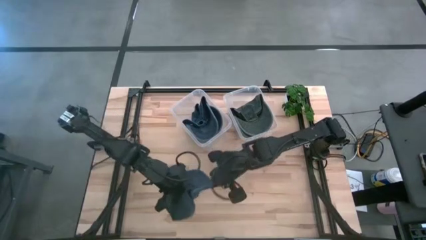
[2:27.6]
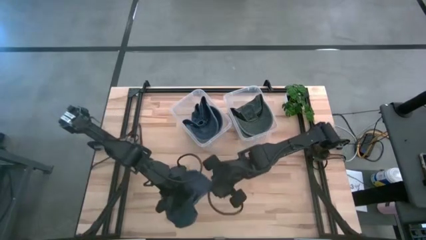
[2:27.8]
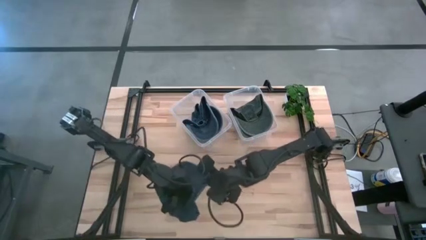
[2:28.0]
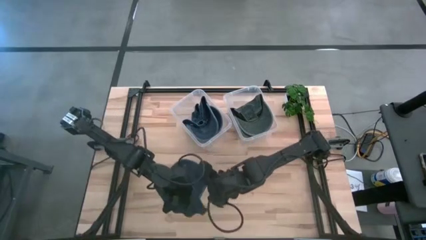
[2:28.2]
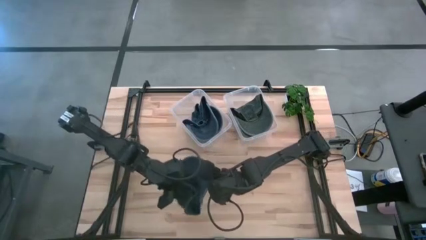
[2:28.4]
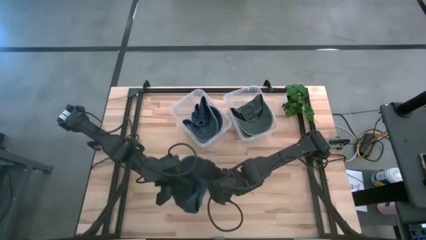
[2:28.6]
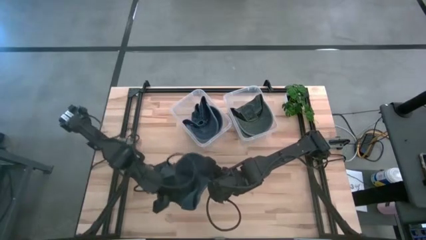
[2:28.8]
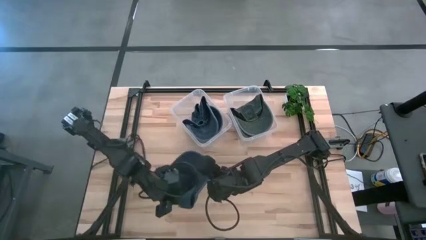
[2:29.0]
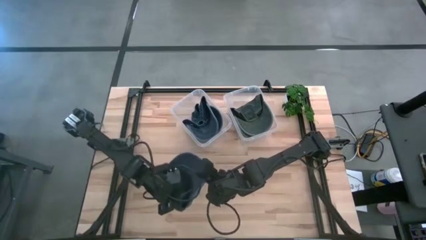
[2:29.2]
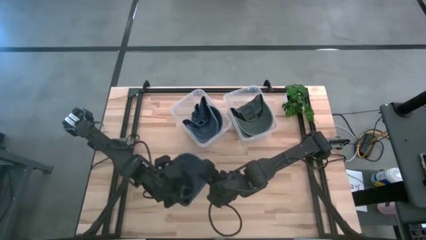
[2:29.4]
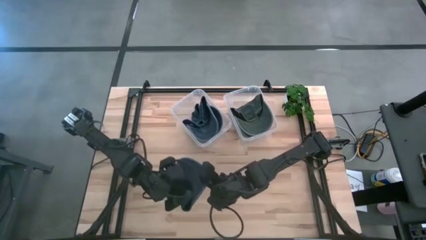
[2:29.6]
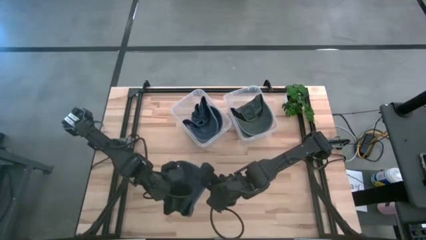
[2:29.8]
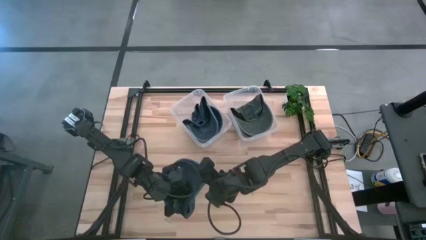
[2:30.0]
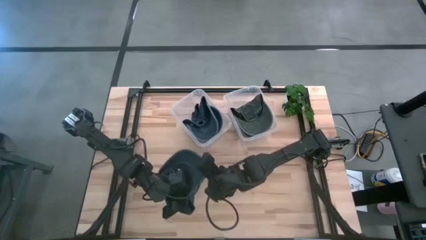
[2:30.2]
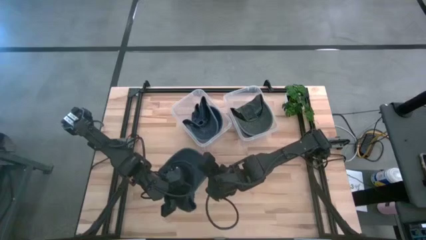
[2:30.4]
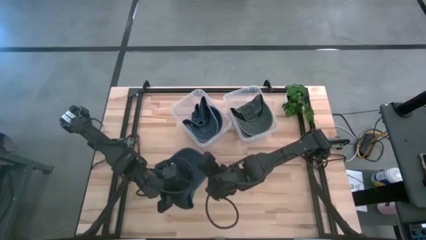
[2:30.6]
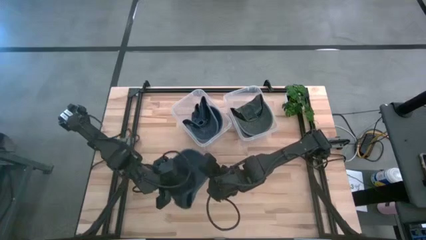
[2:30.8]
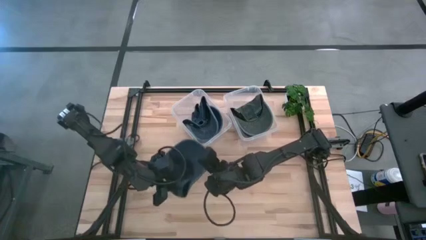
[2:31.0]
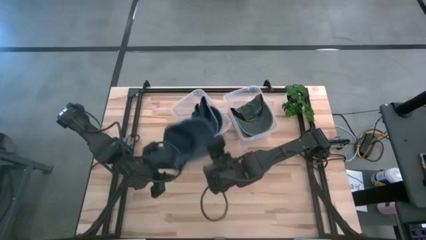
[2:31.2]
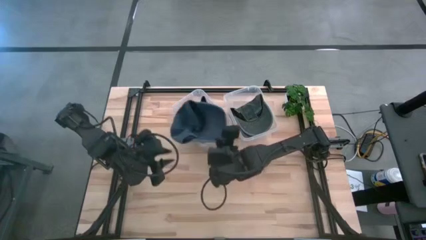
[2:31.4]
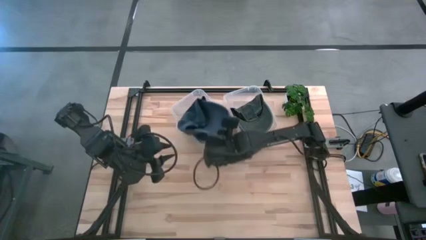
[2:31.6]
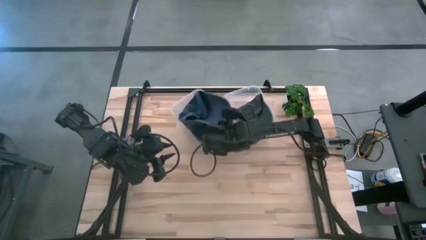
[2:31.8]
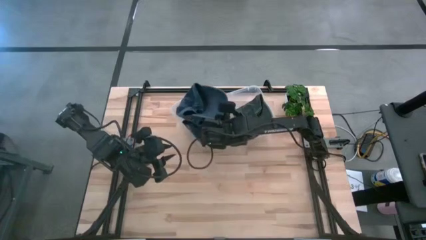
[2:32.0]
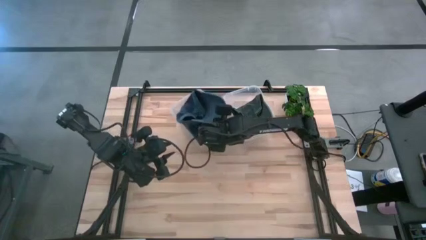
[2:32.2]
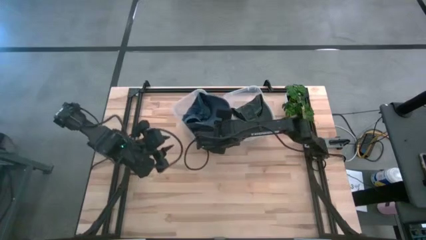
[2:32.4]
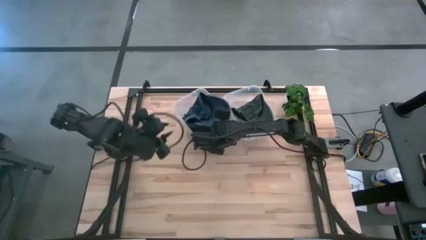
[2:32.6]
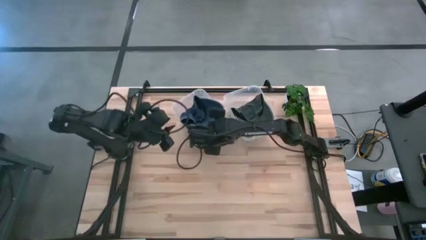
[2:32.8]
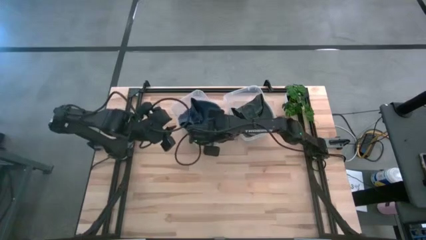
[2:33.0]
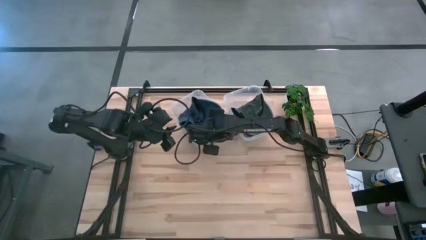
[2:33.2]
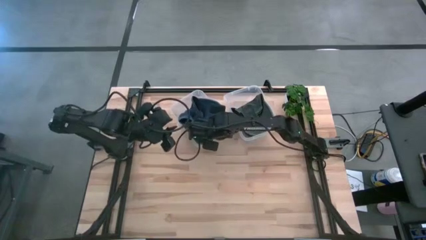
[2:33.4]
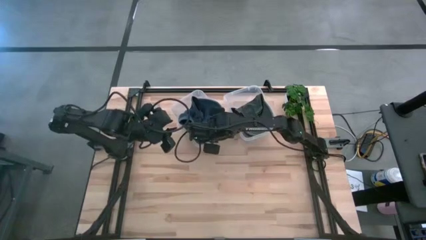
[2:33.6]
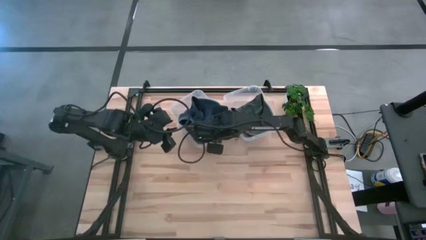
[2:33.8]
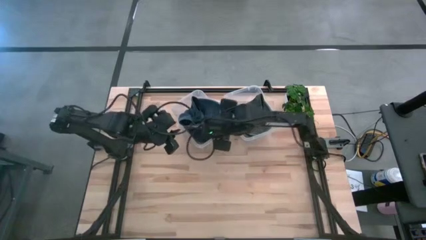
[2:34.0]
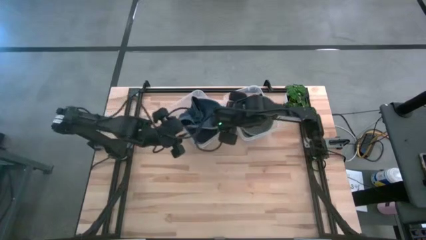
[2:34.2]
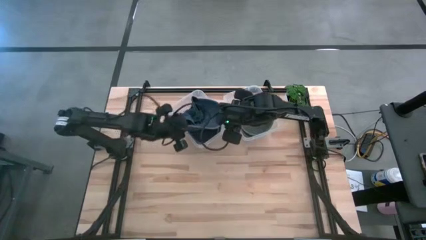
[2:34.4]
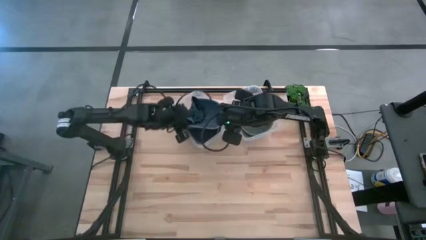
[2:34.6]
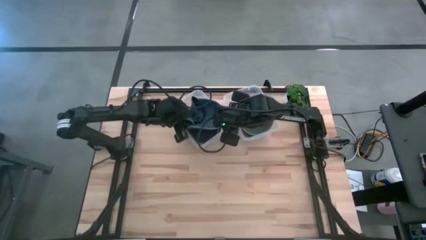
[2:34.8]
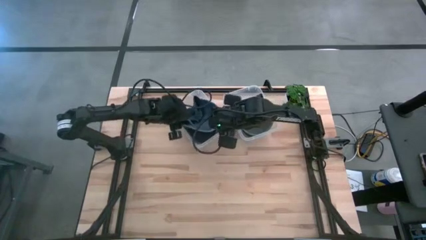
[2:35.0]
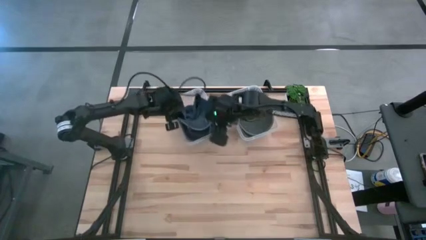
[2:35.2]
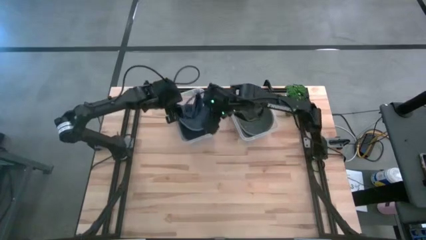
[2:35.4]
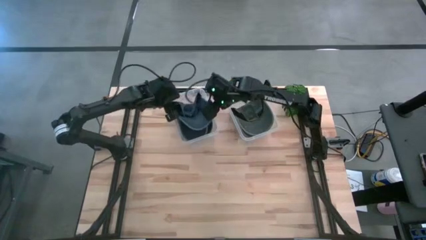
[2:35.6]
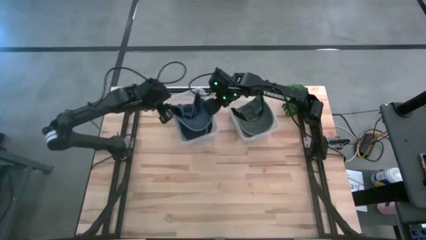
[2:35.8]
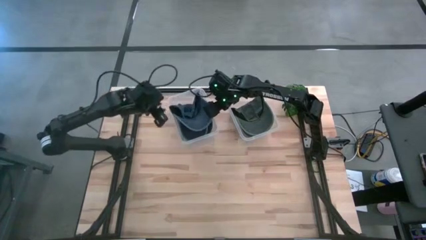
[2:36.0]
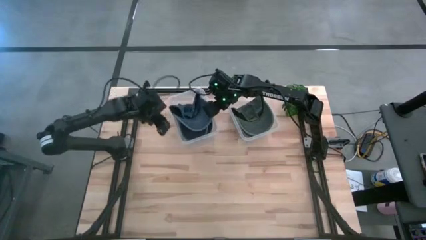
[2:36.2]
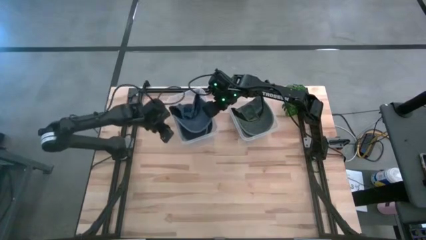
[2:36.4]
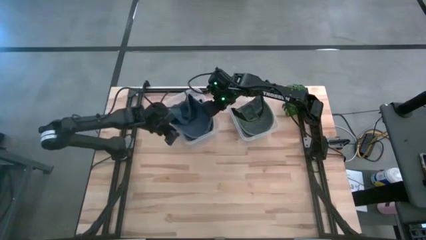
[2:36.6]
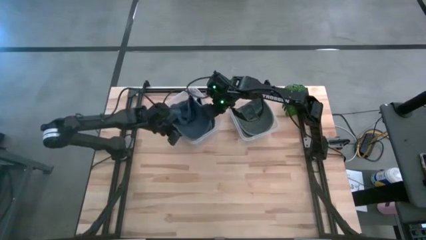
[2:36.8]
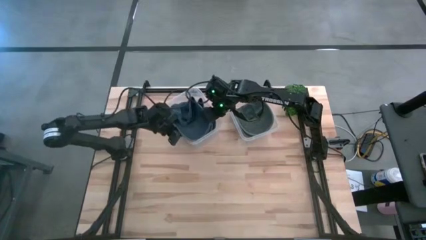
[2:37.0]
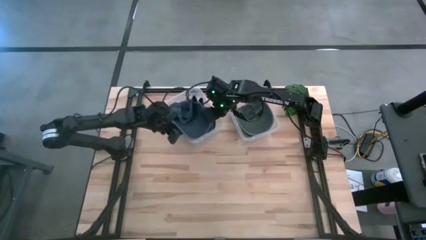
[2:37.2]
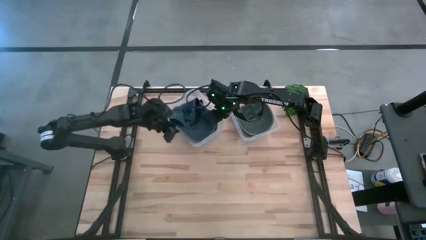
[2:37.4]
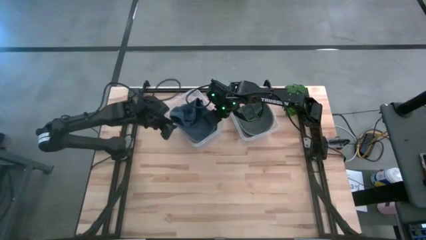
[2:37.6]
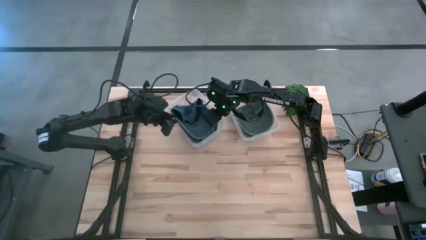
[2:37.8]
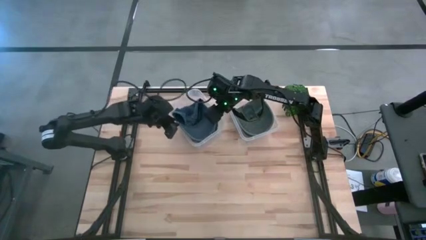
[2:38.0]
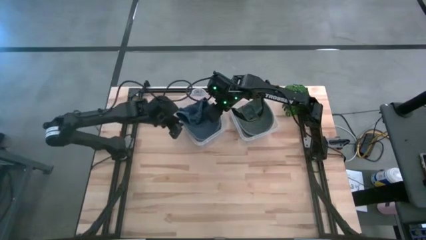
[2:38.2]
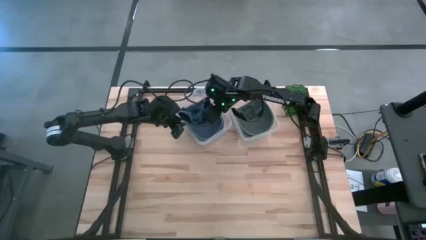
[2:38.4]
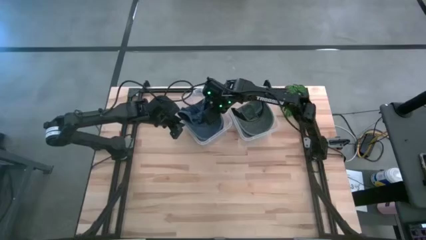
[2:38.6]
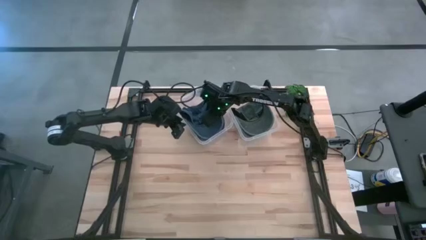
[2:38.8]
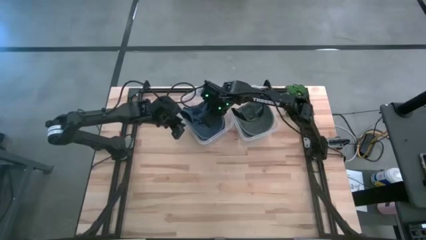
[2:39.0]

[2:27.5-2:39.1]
Task: Pick & Place hat
Put the blue cap into the left bin

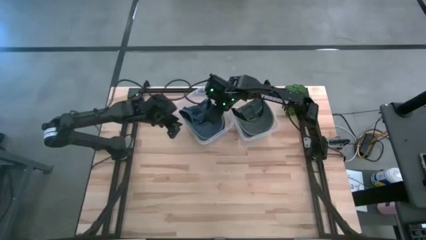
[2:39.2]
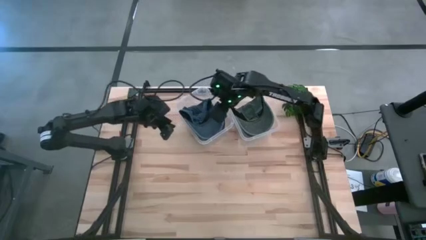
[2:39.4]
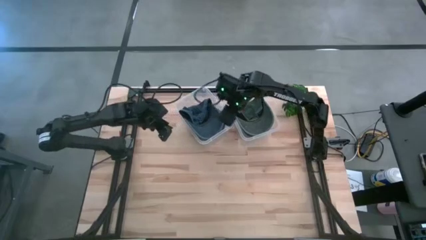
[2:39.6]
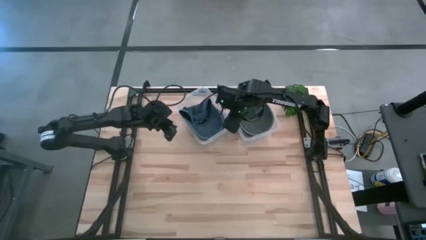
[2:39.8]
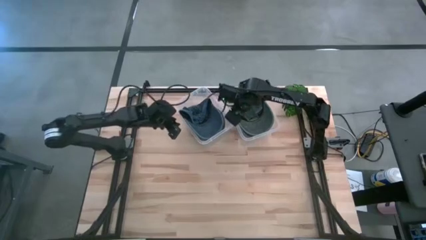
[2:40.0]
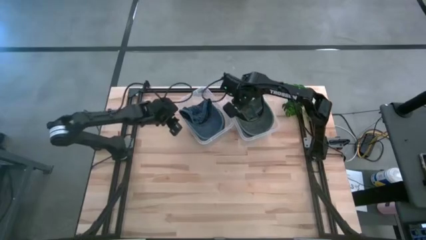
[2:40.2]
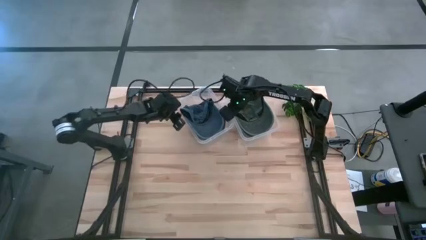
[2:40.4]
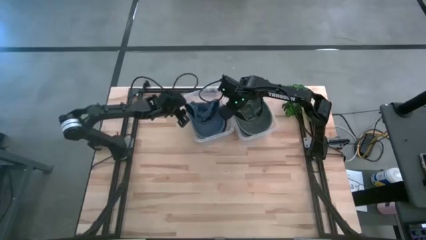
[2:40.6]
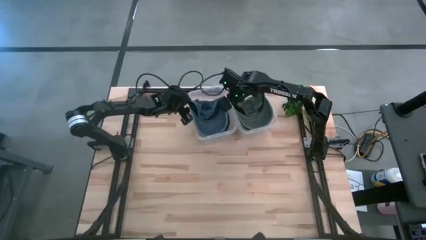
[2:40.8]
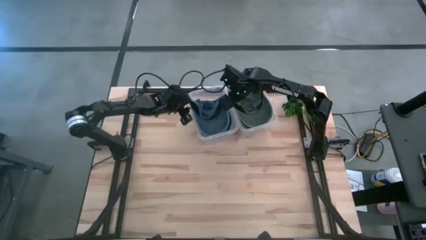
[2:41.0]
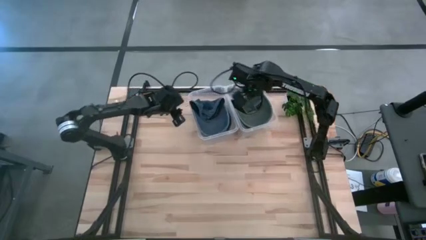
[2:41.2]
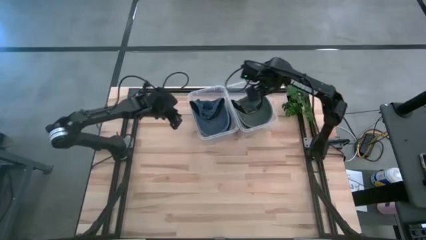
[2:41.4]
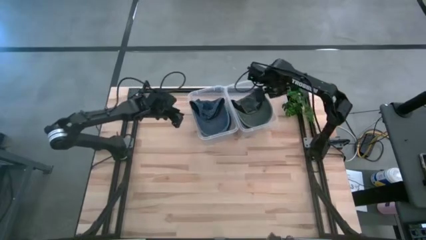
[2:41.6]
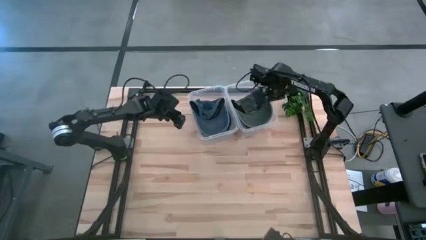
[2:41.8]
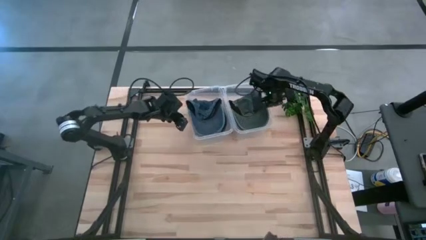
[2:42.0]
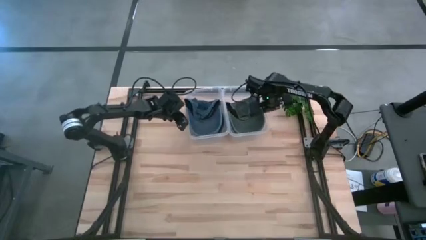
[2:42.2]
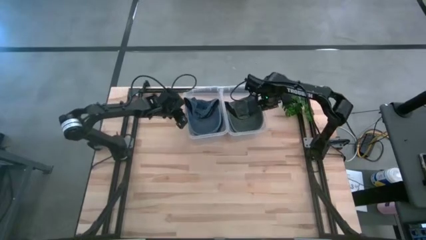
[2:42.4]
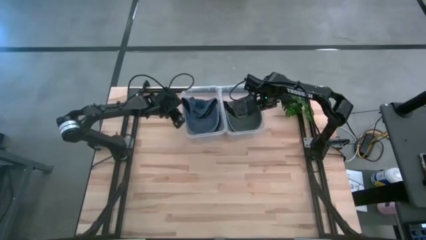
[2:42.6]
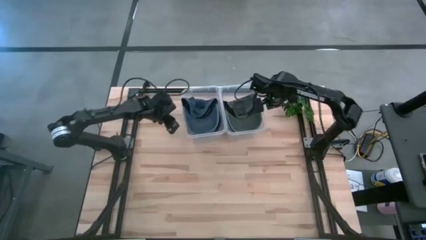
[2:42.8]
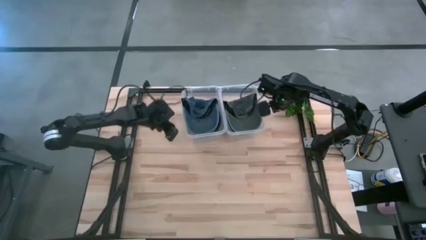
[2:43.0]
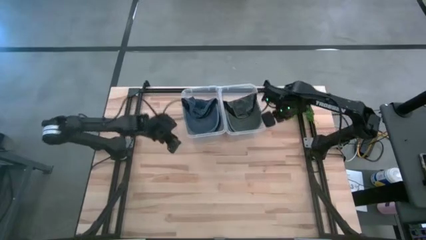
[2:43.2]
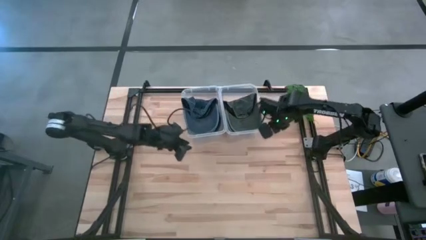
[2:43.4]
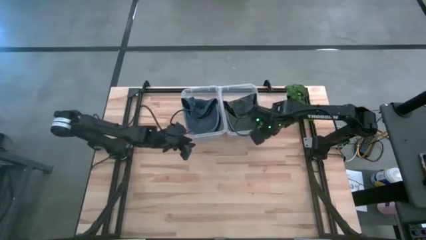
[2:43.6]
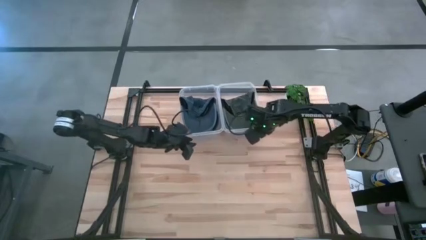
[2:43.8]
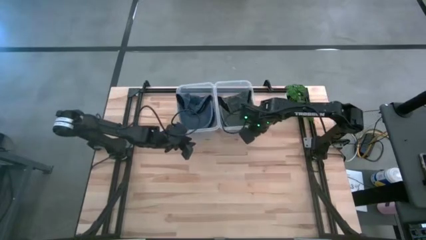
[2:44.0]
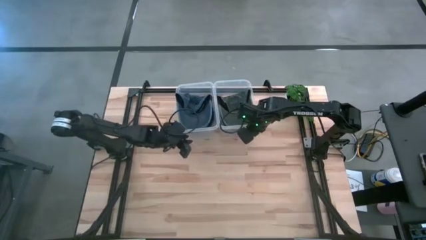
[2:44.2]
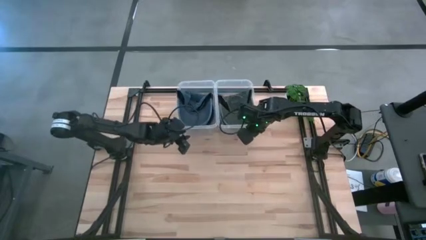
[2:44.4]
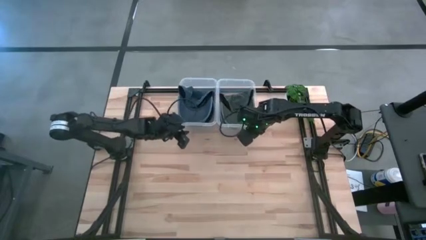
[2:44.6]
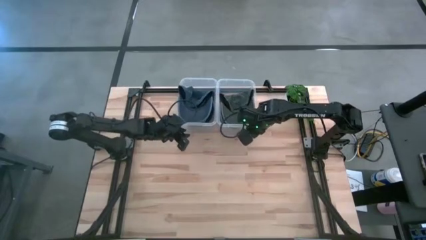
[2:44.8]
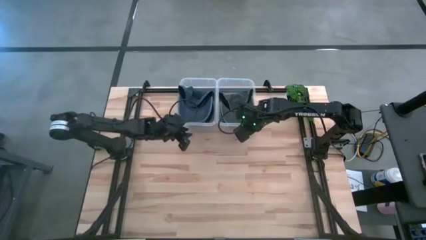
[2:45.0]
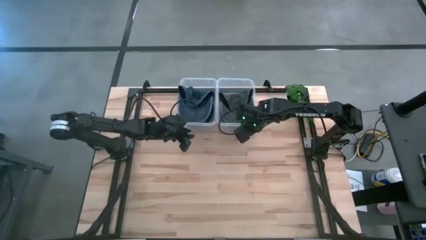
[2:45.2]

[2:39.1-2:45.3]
Adjust the bins
